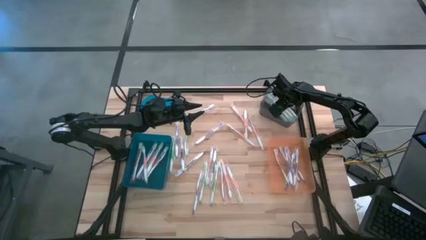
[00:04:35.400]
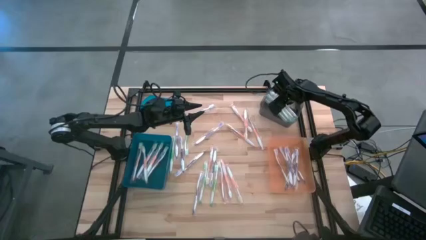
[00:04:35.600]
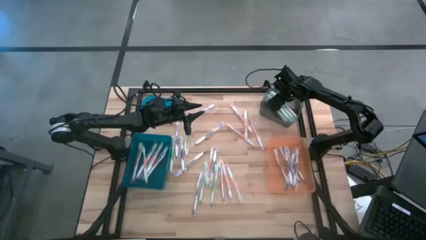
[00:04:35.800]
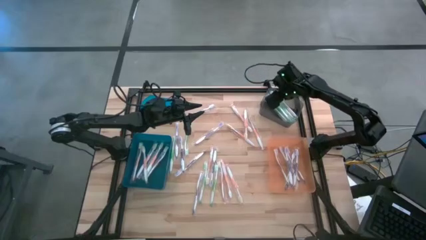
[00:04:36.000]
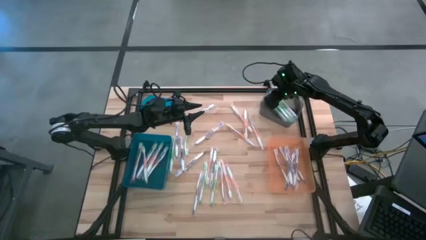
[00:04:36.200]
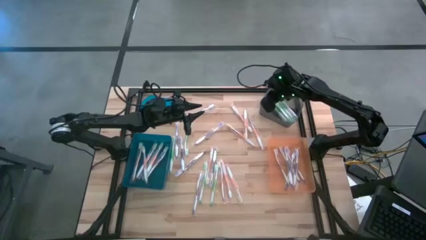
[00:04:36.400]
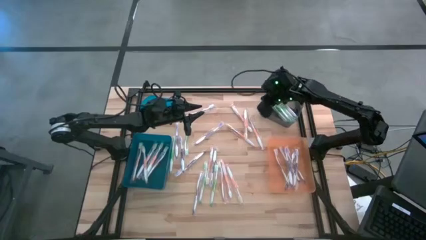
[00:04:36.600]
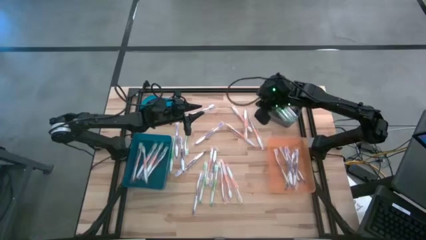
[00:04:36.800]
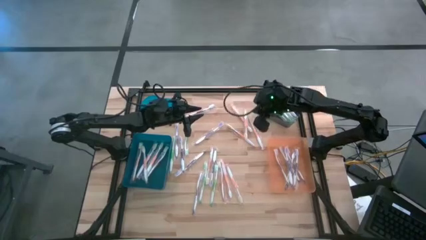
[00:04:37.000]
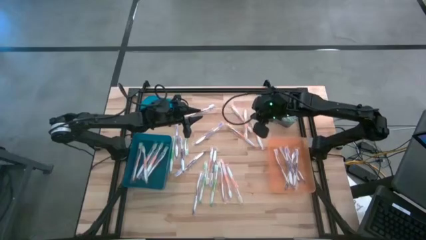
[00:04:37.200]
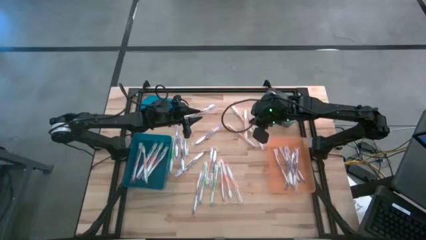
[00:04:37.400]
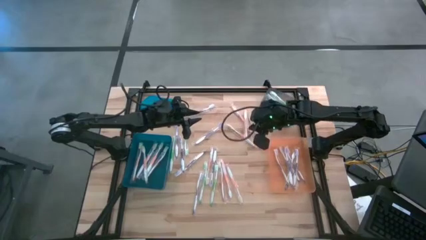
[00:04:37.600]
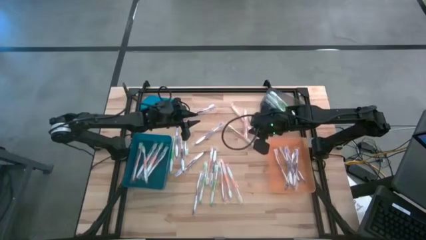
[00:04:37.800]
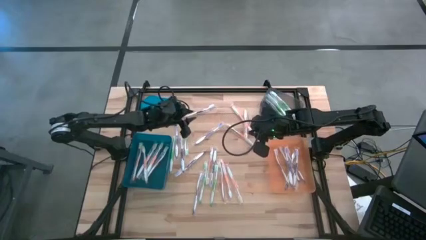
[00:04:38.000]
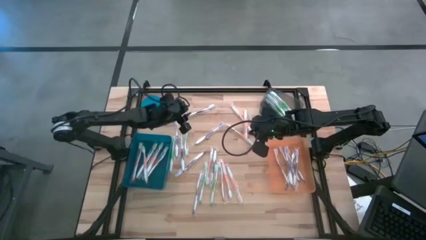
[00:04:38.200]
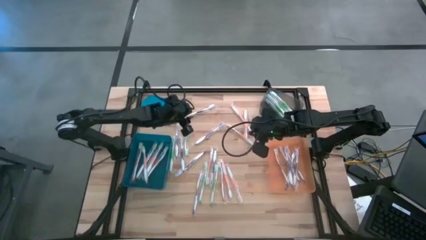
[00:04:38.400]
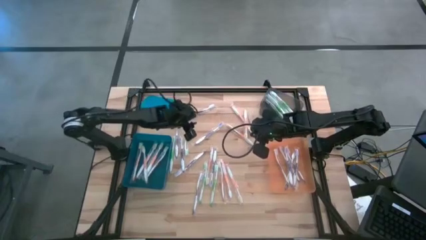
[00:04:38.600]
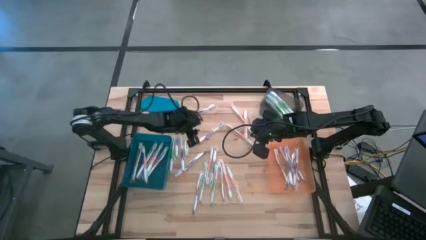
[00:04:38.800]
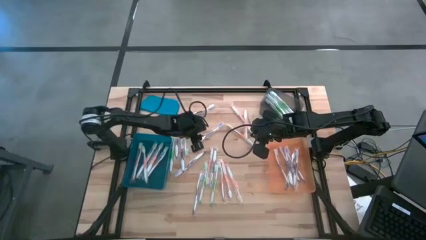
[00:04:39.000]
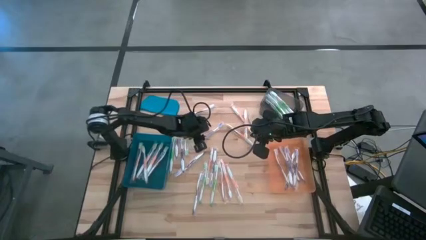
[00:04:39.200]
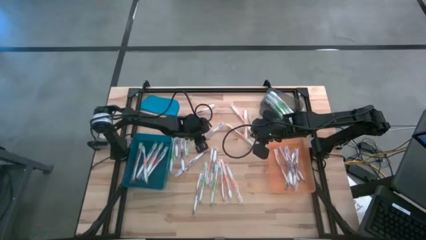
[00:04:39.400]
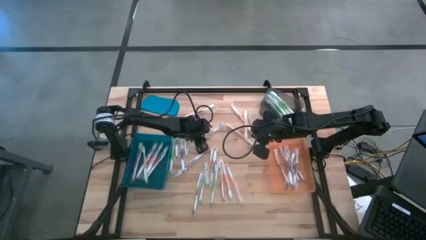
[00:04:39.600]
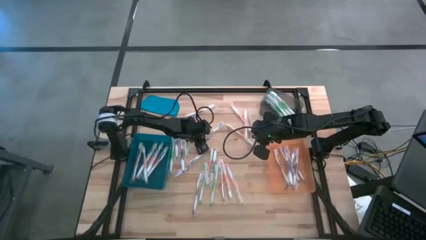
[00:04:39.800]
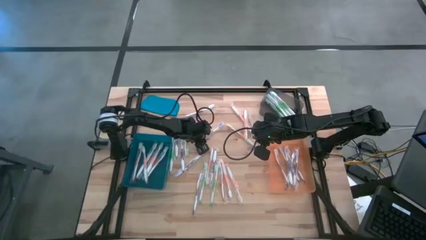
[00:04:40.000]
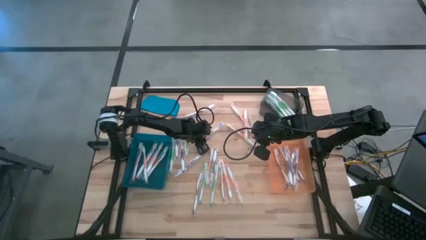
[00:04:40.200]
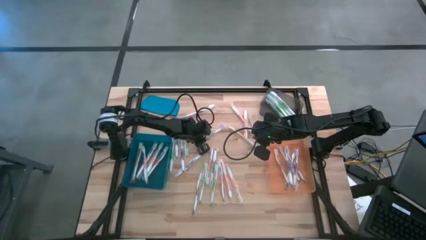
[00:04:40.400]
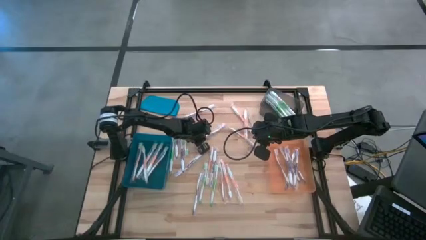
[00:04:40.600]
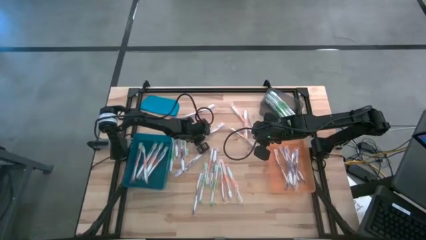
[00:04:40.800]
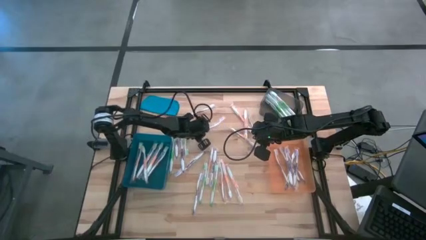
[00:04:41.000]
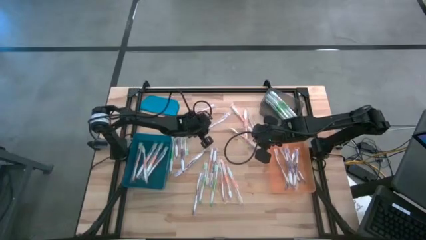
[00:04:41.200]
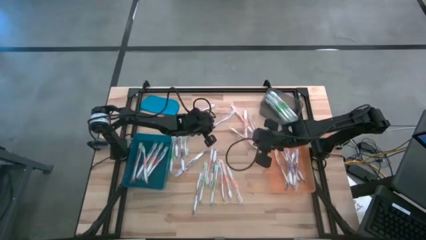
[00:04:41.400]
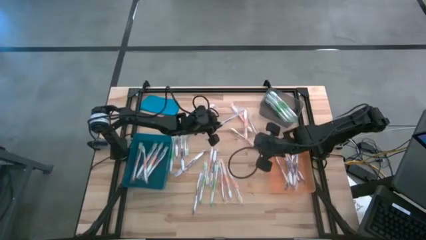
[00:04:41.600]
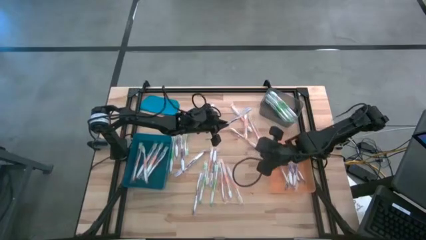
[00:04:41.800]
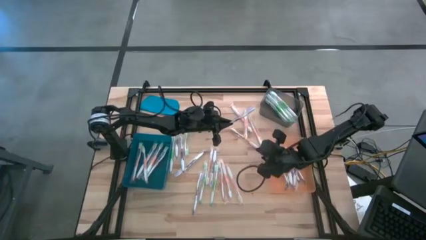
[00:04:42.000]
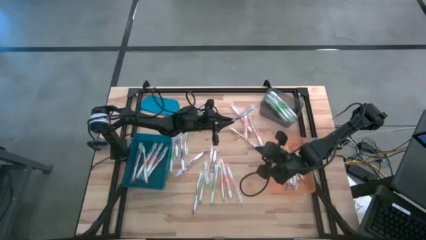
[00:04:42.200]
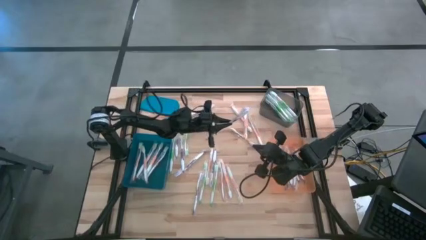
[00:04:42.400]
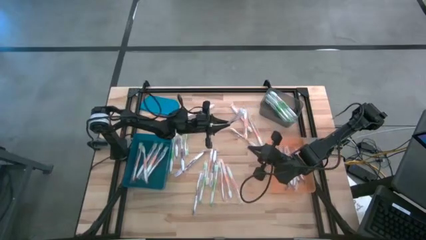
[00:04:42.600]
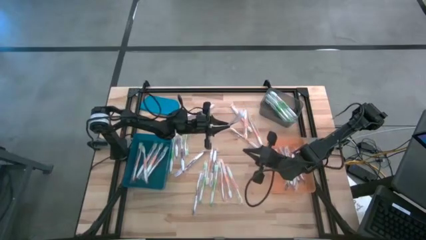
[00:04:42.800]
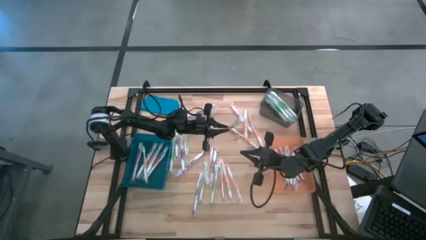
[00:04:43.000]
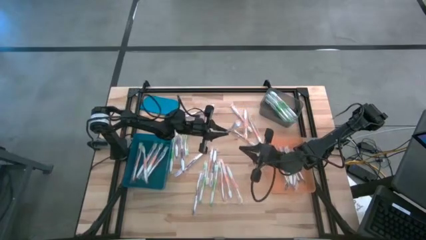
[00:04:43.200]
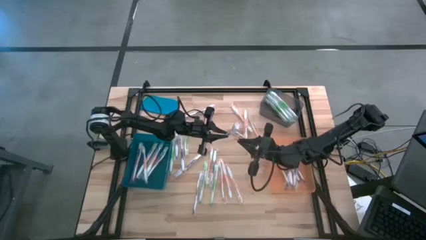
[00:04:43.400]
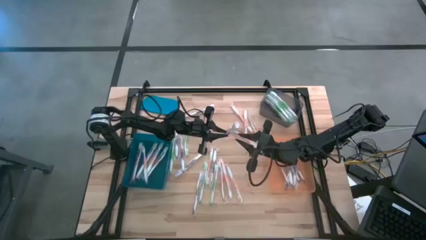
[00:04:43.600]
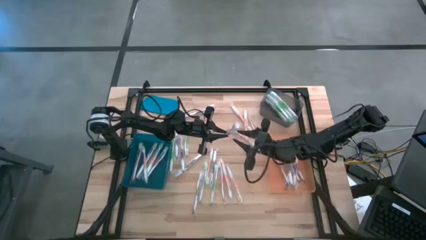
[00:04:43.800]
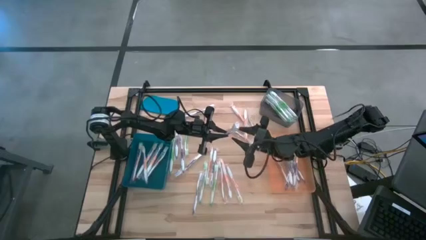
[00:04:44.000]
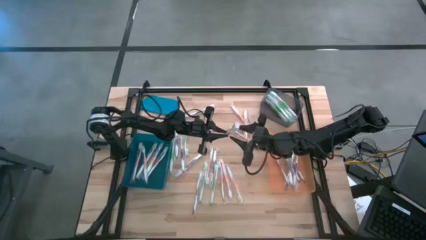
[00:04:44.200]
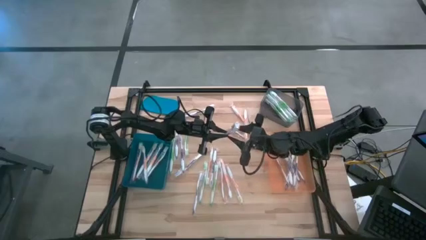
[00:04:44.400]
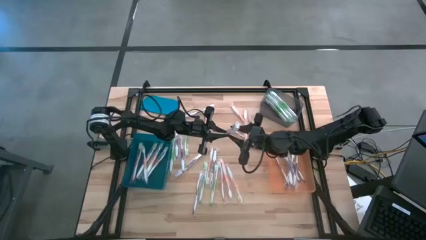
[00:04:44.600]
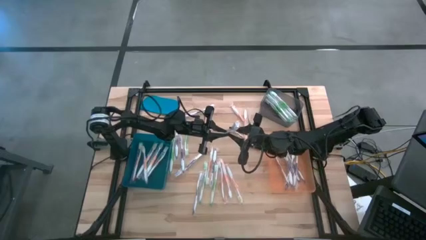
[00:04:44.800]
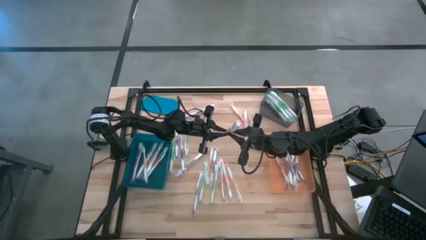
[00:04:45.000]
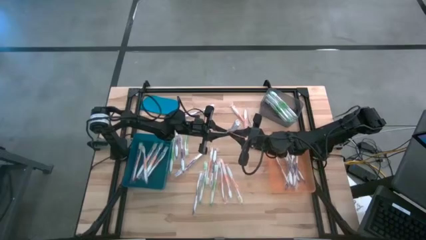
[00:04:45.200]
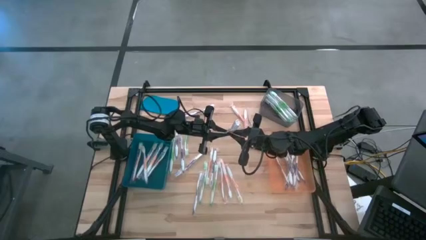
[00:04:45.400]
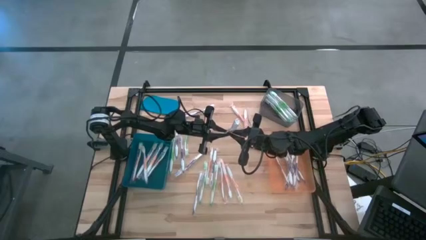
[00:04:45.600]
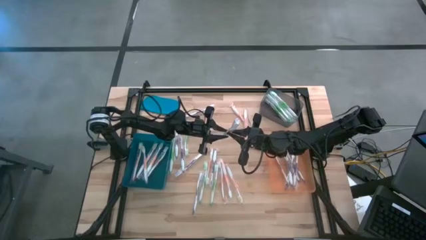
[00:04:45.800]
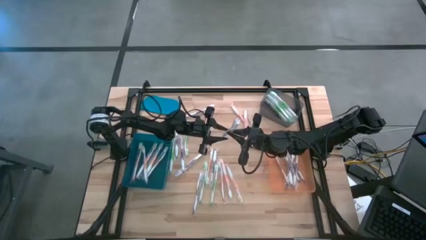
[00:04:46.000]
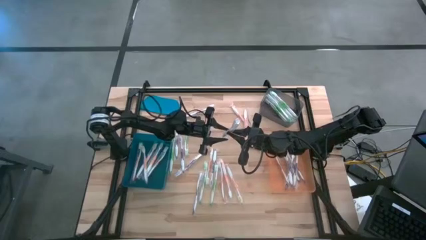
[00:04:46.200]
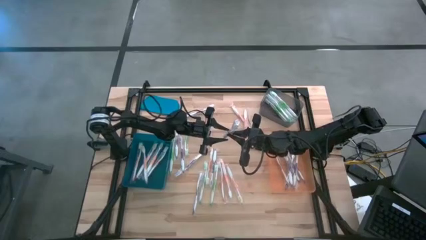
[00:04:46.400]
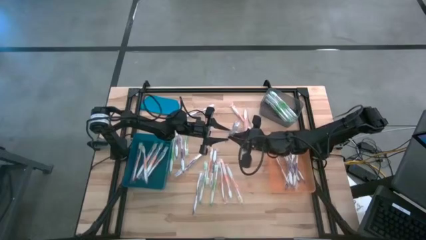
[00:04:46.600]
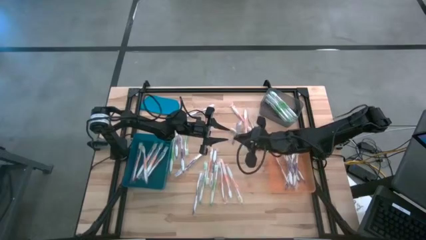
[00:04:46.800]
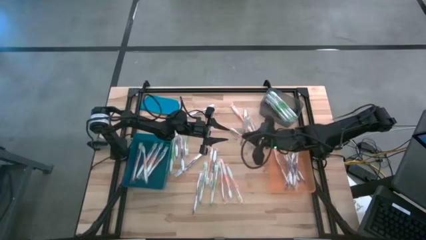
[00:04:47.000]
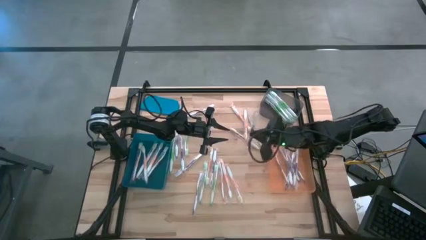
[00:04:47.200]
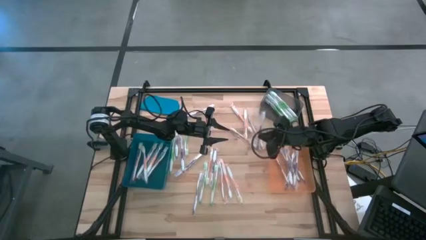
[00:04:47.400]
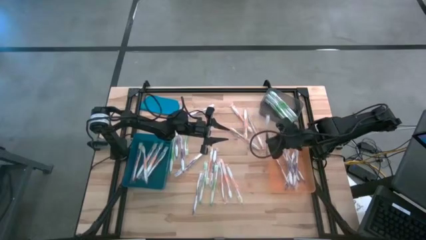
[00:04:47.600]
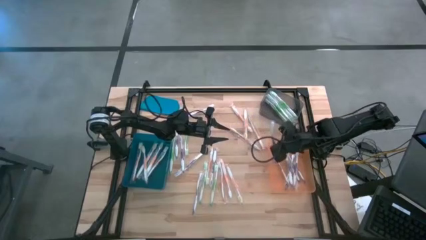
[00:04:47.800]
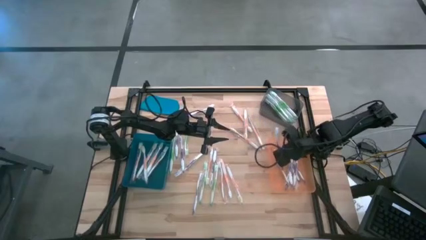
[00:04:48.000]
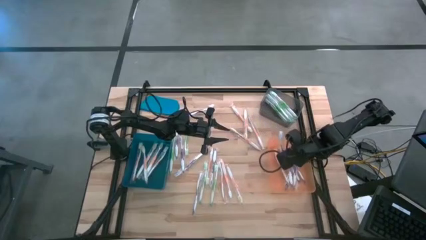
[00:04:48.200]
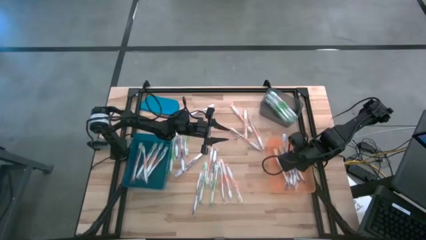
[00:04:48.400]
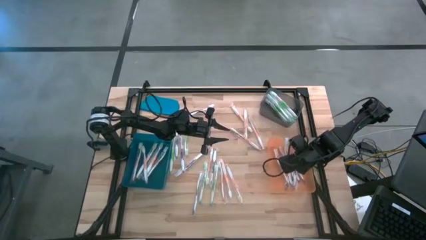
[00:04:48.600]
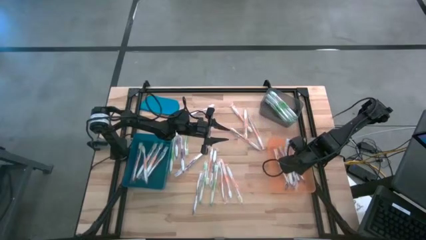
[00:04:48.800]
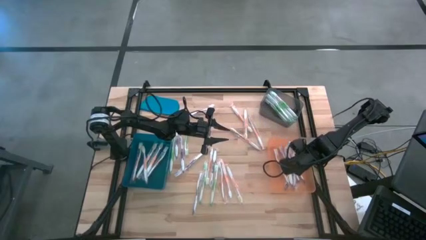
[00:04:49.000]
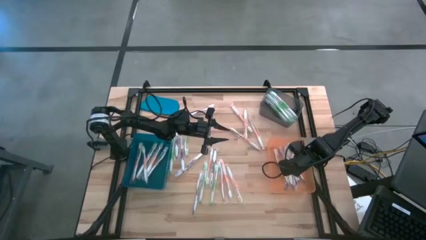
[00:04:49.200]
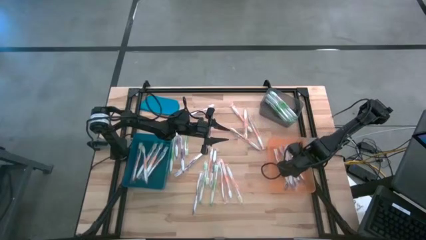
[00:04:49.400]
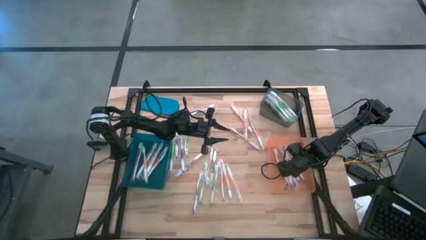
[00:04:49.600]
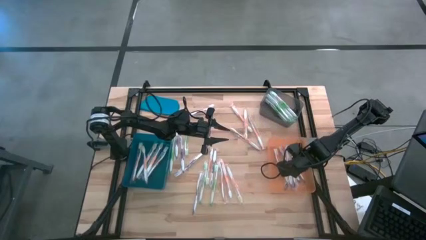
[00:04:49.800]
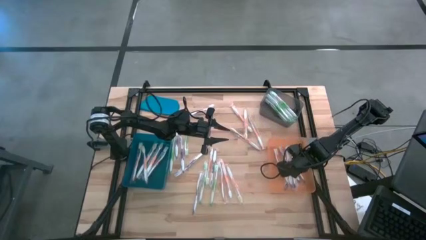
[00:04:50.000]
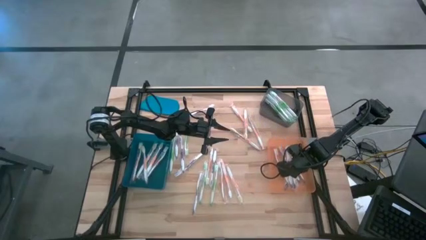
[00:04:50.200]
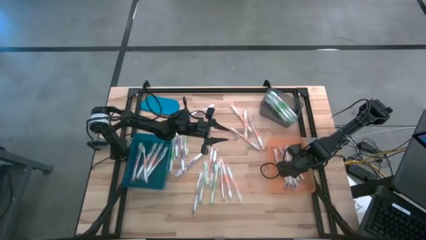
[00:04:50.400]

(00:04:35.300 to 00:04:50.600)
Task: Pick & Place Toothbrushes
Put the purple toothbrush into the orange bin
